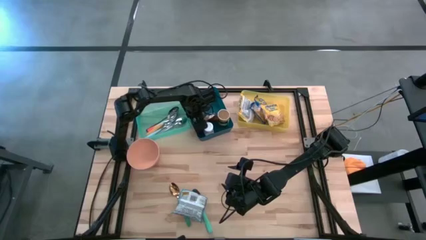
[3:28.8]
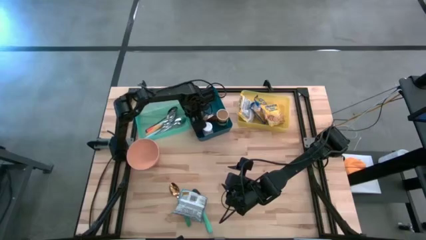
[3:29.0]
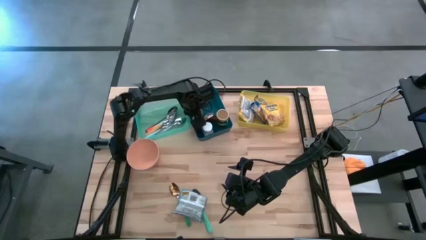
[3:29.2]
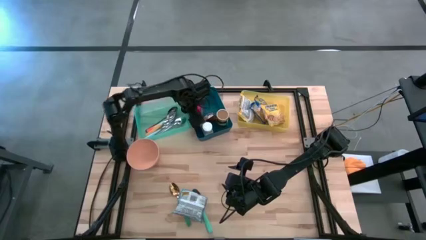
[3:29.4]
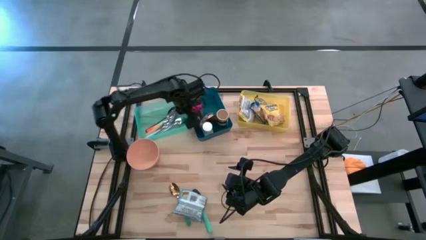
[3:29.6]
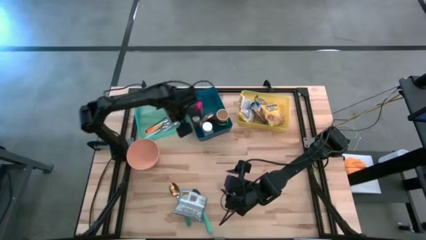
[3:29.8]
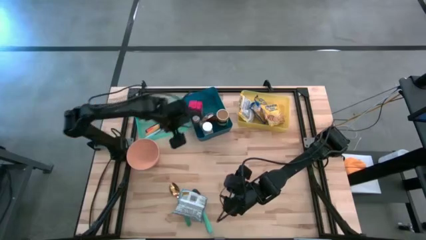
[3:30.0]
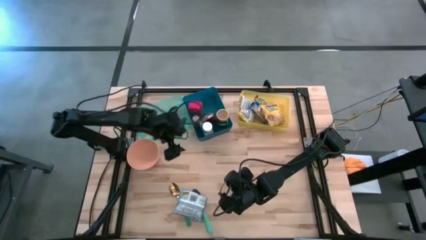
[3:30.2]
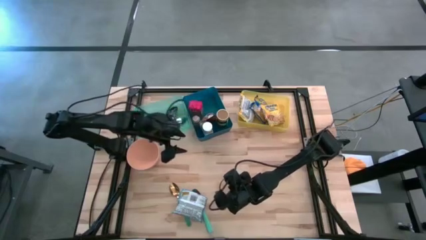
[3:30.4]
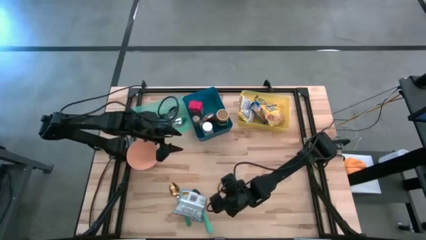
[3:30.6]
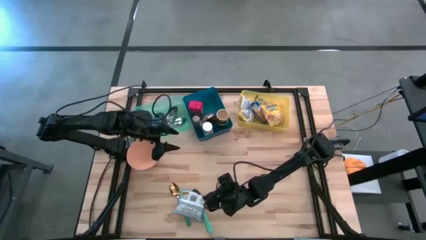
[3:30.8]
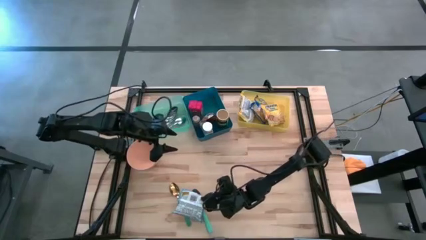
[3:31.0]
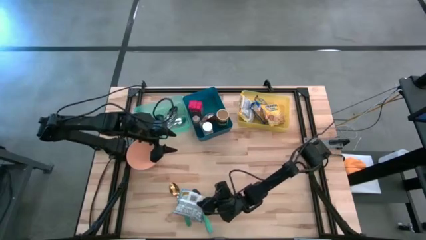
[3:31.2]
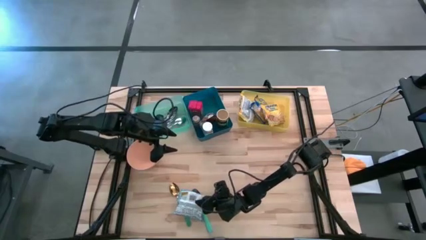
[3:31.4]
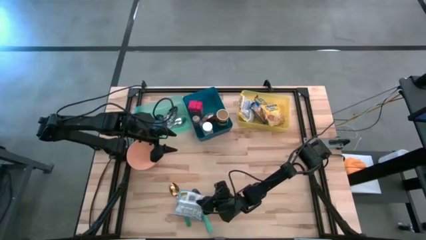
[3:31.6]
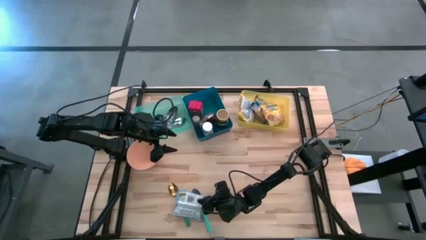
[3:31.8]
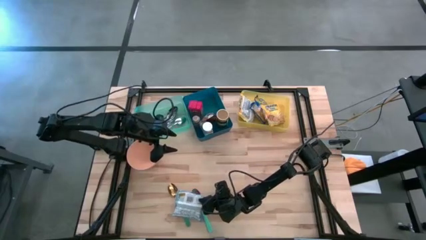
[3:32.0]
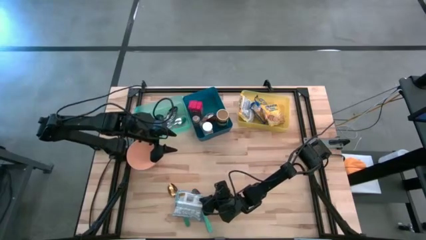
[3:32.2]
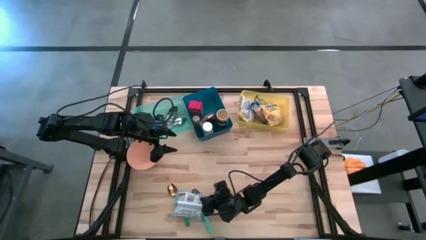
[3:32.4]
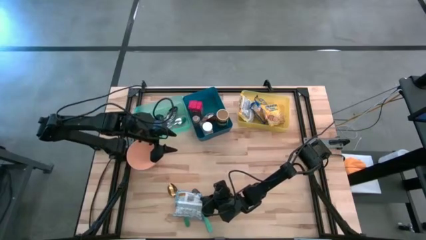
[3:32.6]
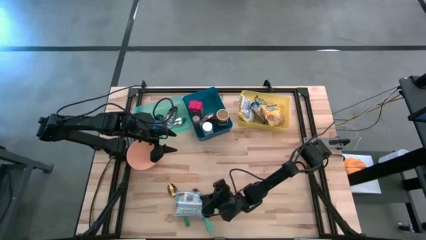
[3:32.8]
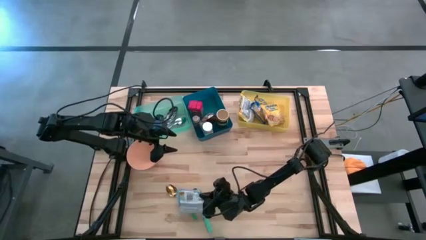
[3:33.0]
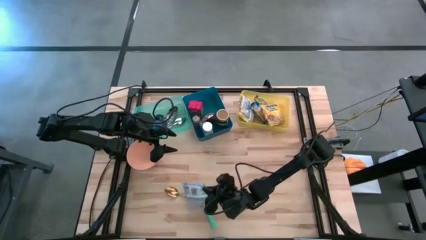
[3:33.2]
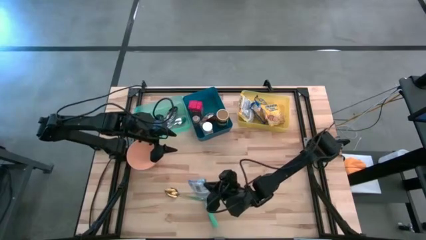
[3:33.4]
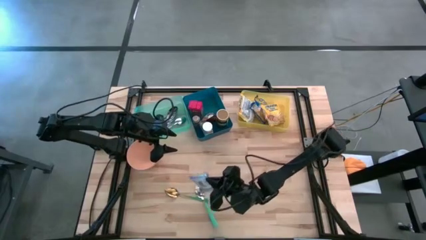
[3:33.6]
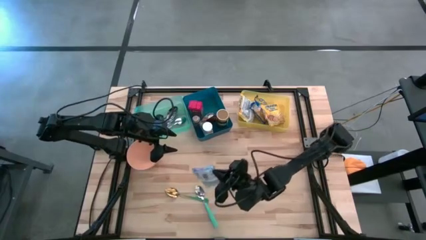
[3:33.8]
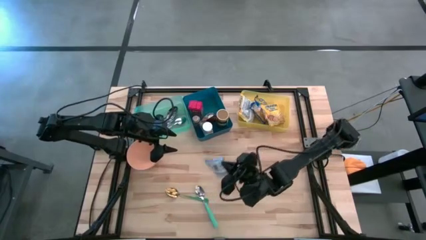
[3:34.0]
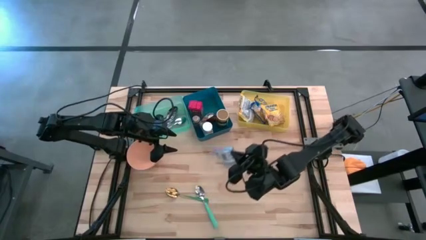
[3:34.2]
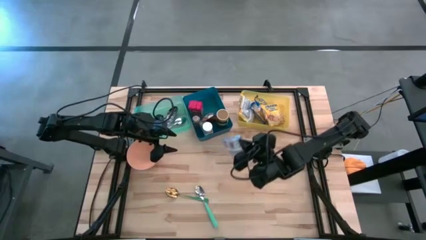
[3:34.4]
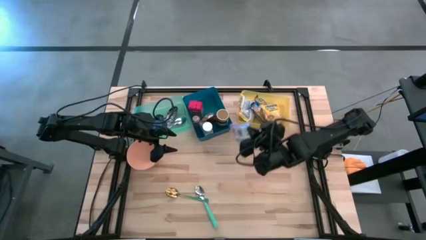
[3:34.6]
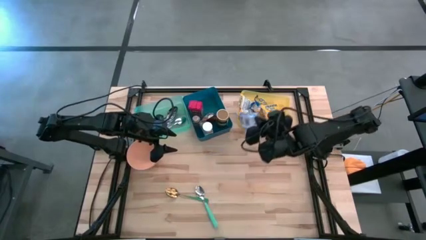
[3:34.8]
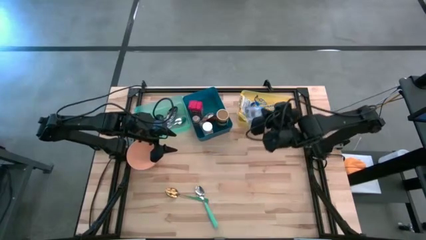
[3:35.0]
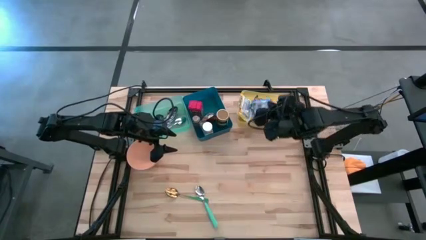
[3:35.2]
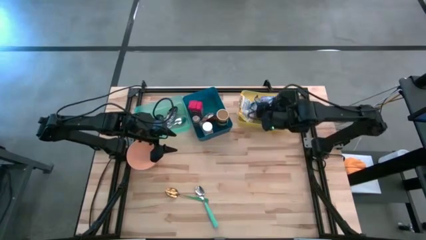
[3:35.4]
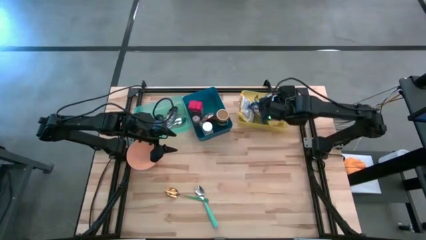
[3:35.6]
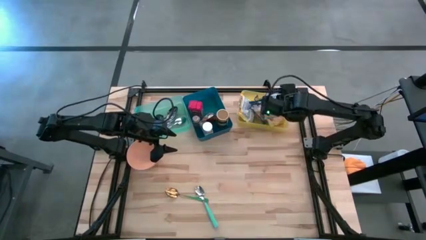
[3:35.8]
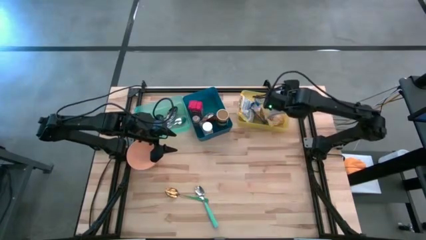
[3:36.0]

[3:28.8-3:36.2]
Put the light blue noodle pack into the yellow bin
